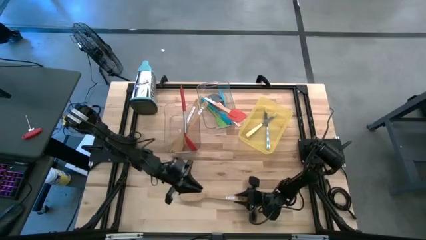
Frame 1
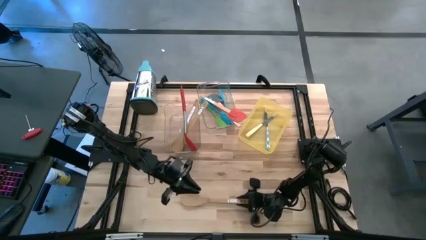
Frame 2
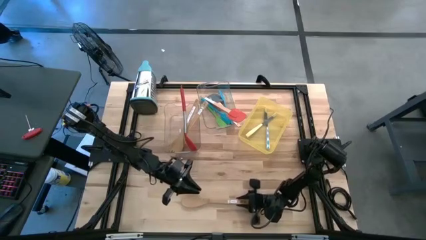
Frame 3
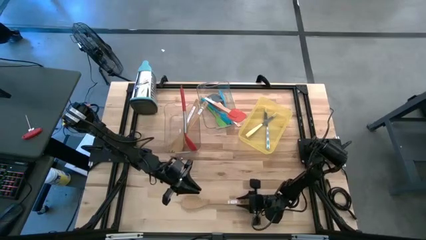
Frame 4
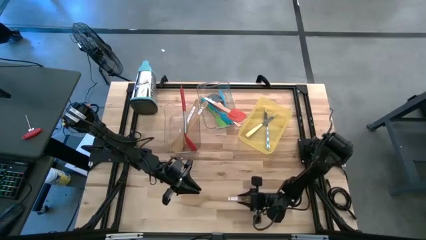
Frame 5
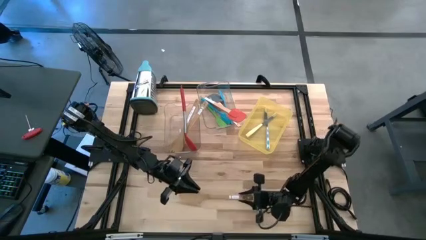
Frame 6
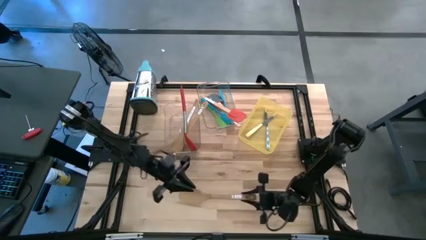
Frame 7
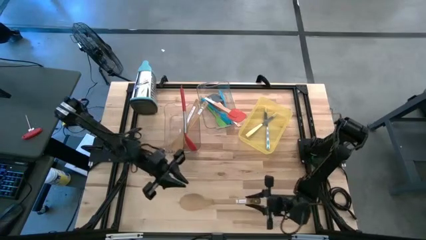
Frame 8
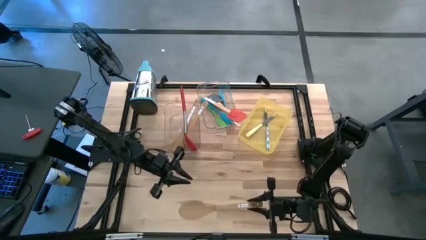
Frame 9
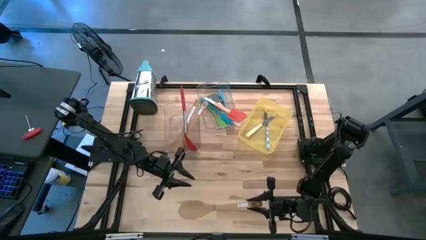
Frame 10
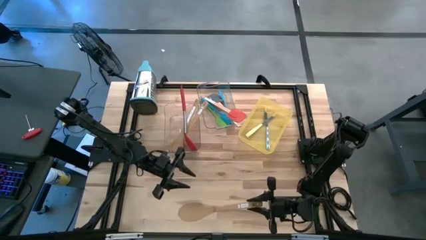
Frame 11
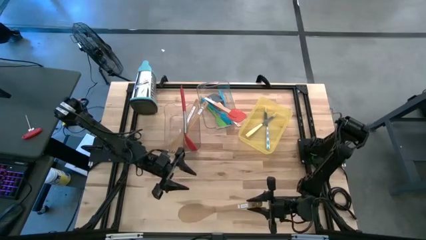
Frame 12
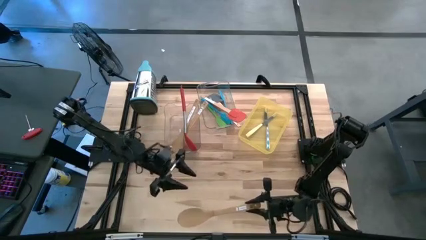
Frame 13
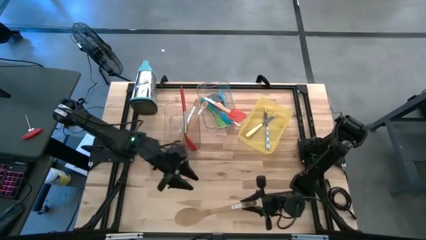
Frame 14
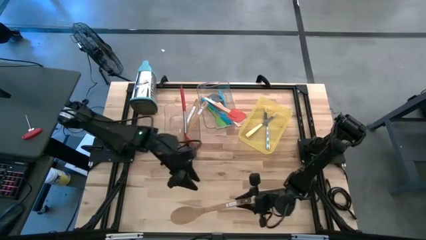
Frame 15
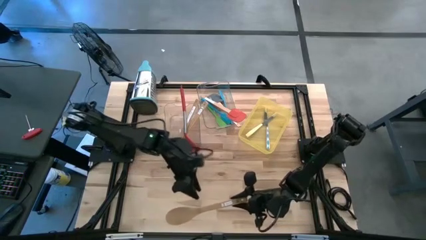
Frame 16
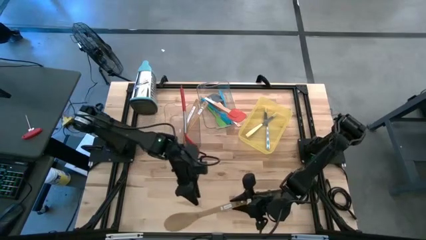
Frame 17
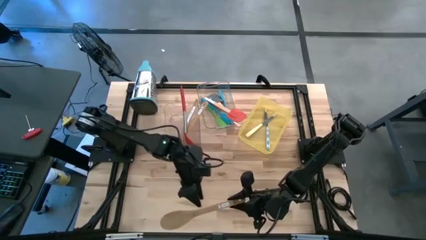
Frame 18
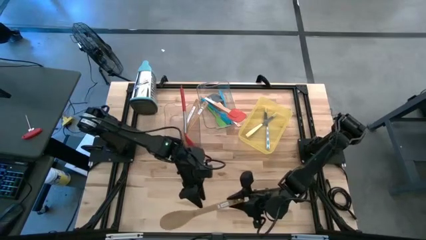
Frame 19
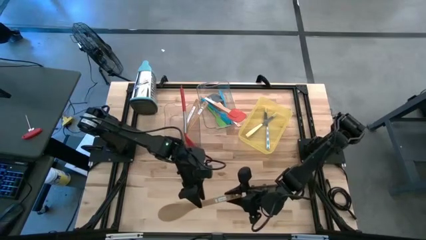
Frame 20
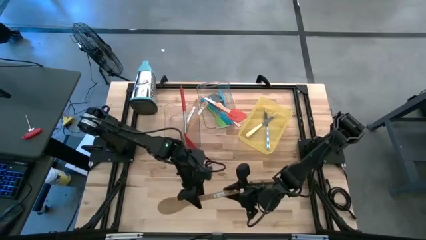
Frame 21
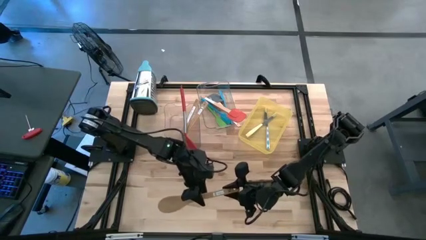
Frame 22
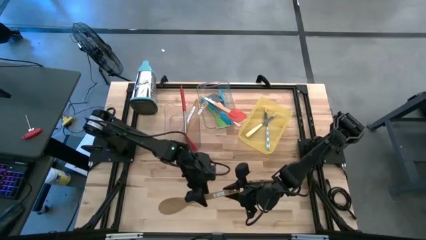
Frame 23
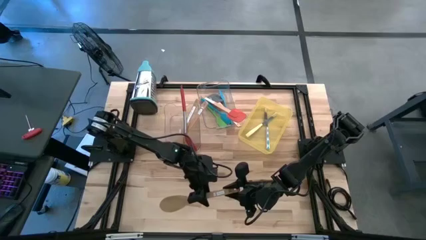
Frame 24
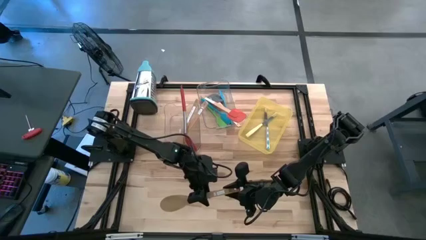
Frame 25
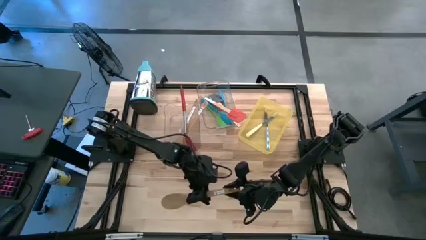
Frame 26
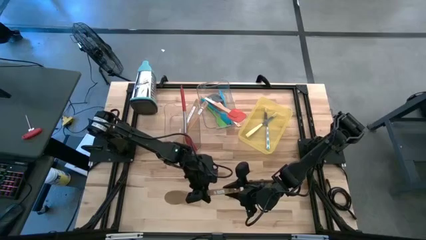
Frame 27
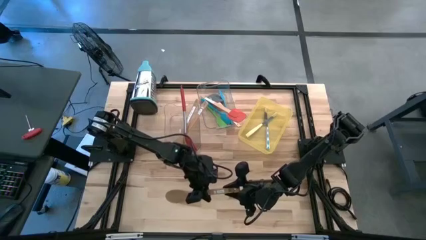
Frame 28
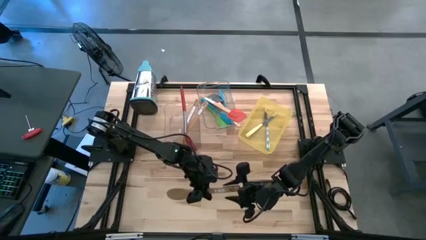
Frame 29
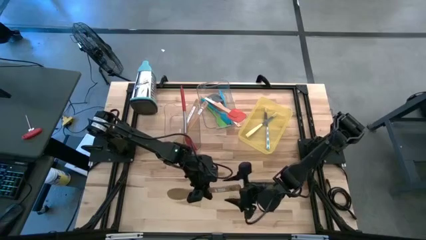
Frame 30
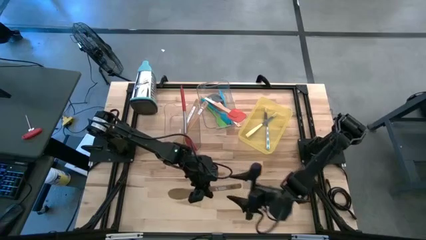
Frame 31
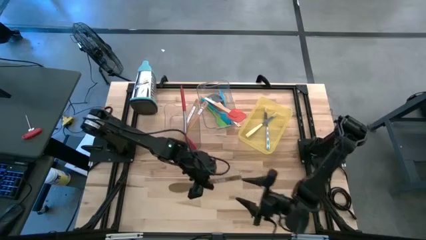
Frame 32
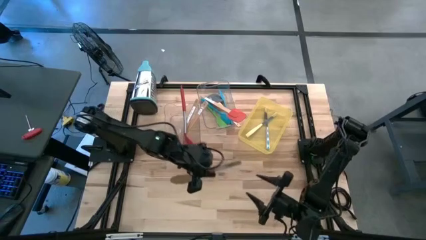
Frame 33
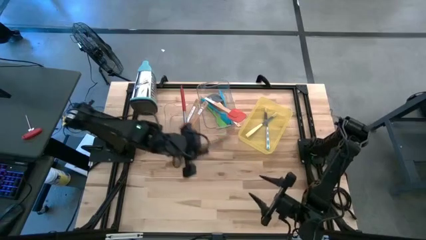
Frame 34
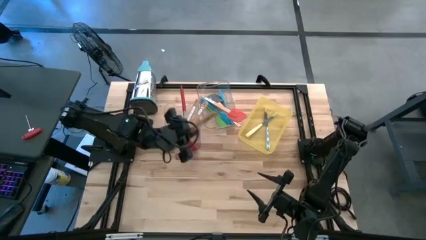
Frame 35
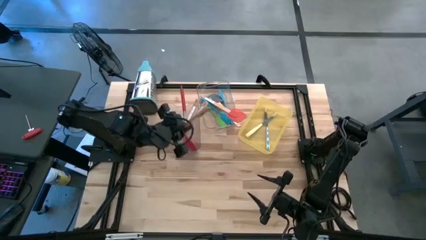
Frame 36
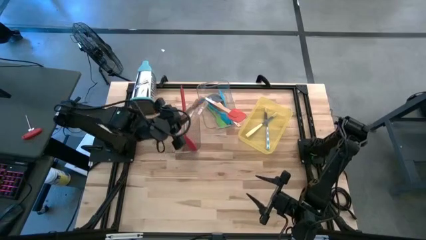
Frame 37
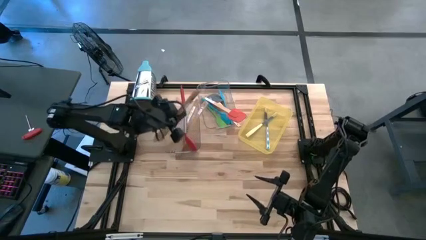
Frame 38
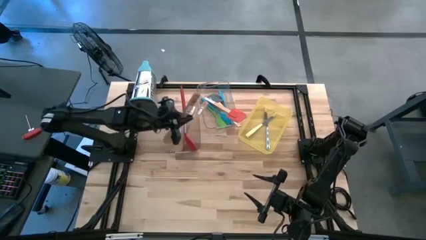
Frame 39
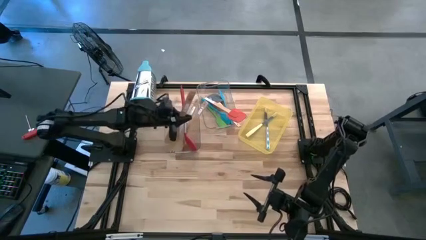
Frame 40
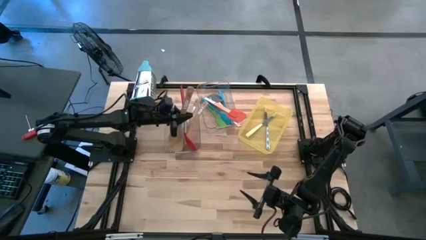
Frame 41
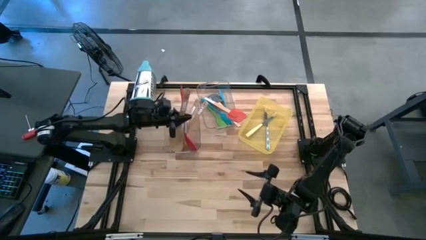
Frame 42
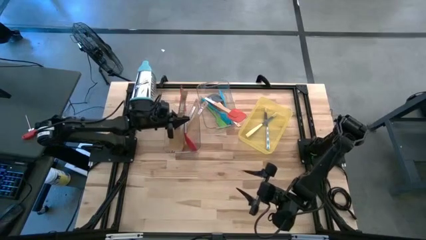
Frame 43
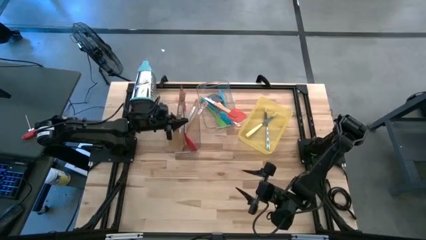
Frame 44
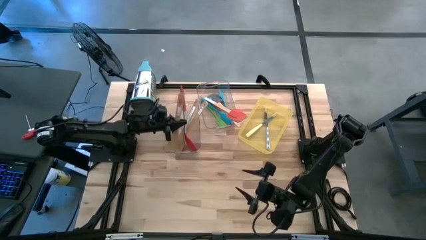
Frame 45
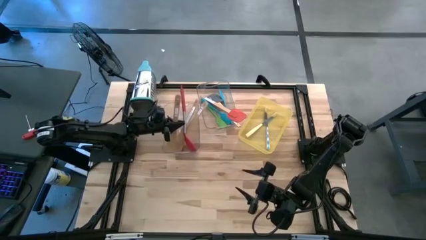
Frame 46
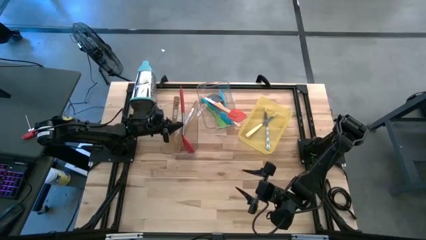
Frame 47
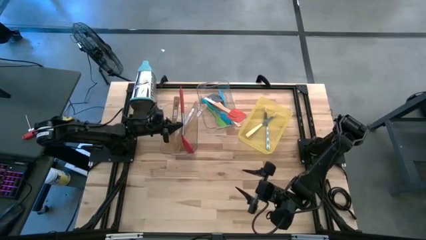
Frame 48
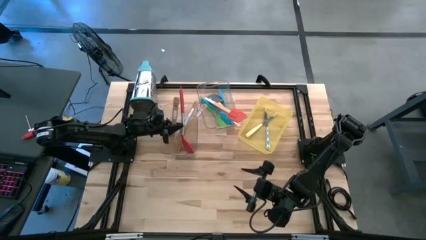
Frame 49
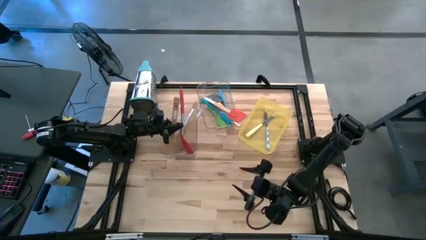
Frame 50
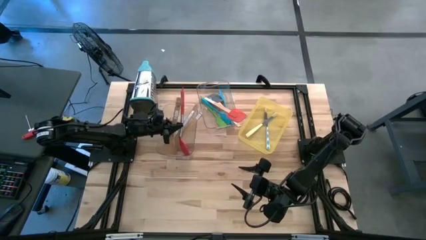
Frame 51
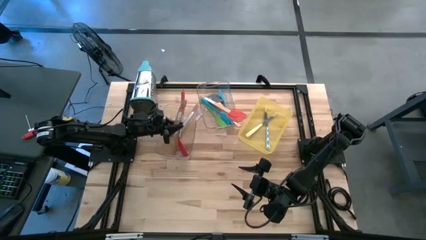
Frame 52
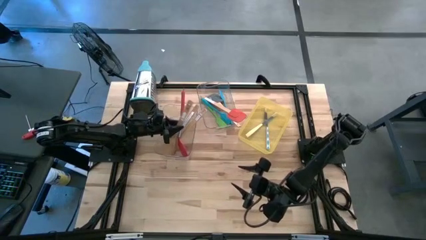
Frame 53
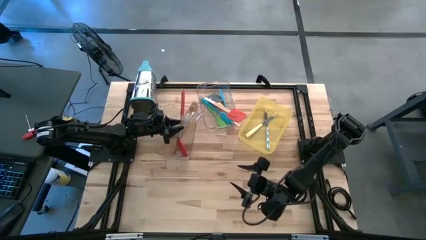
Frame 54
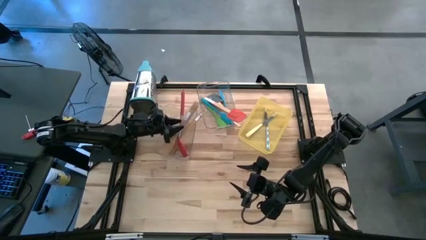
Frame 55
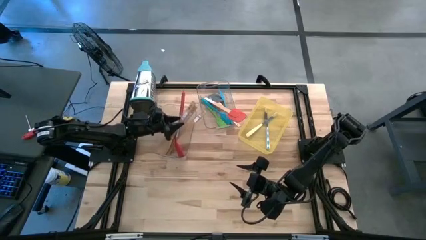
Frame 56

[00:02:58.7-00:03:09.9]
Task: Pick & Place Kitchen Items
Put the wooden spoon into the top left transparent bin

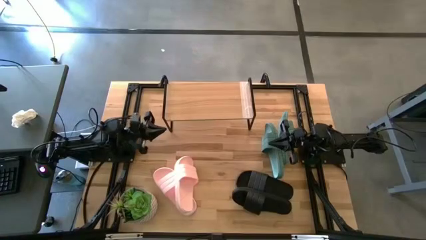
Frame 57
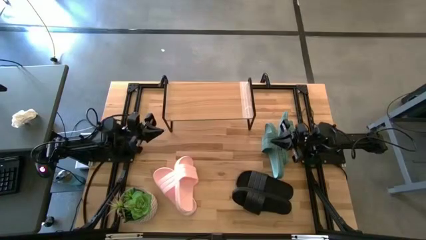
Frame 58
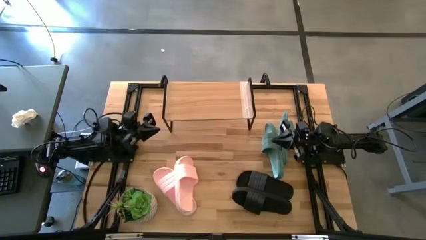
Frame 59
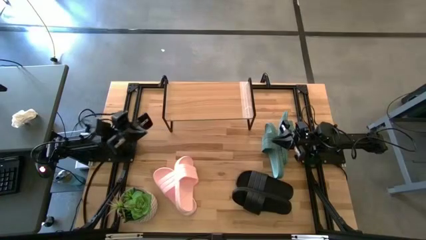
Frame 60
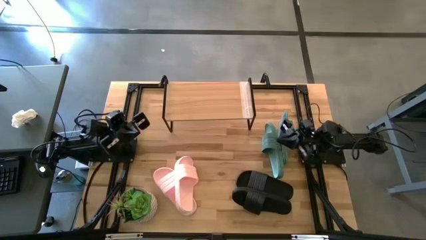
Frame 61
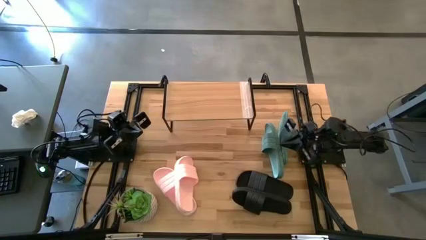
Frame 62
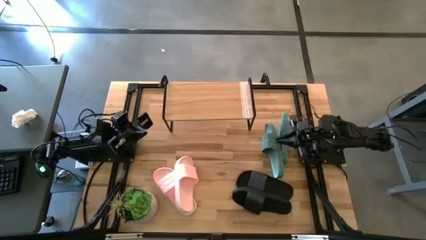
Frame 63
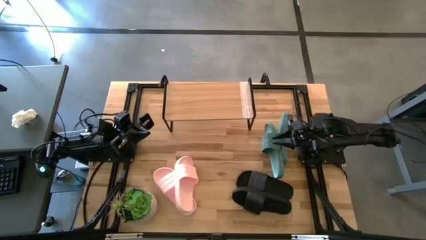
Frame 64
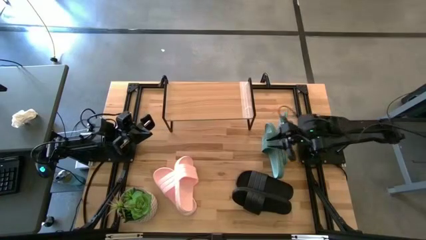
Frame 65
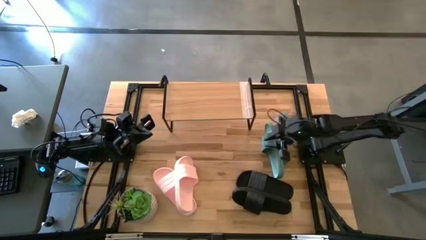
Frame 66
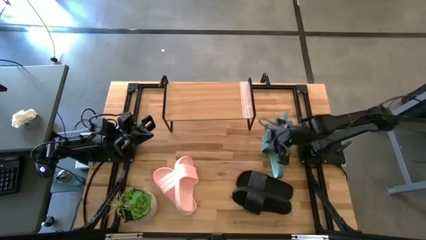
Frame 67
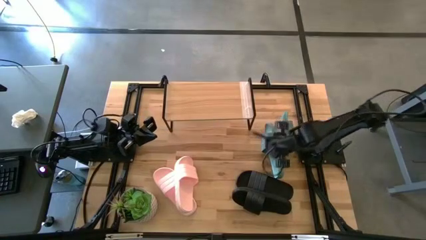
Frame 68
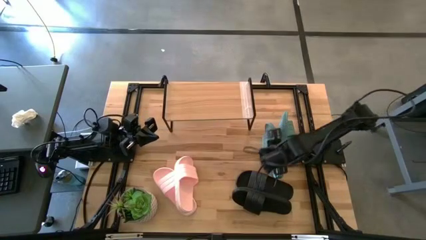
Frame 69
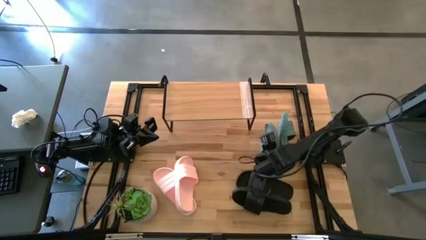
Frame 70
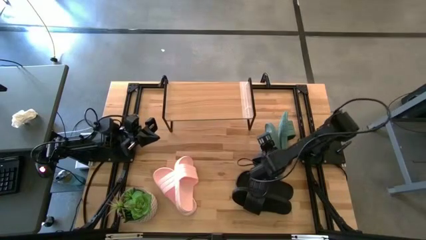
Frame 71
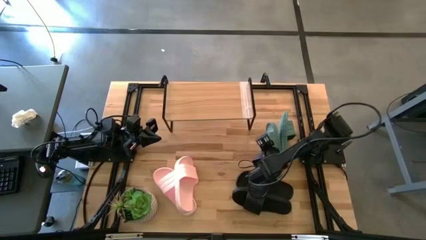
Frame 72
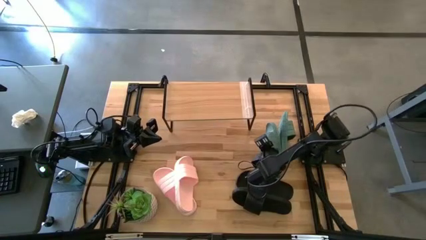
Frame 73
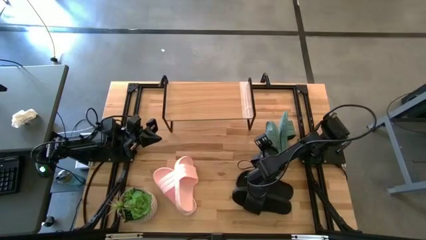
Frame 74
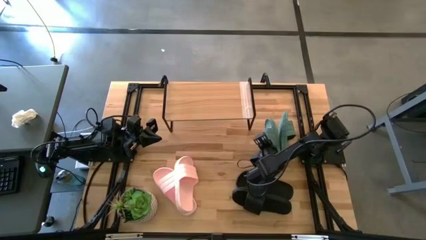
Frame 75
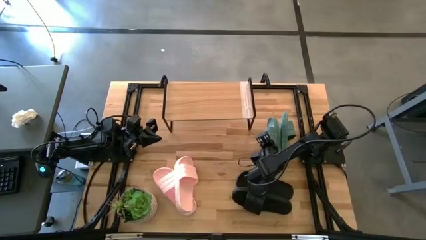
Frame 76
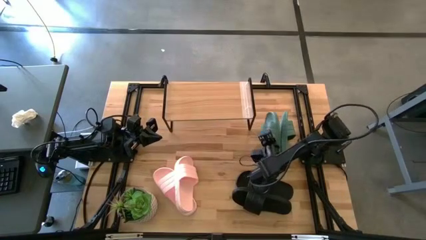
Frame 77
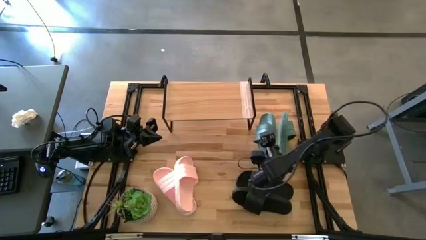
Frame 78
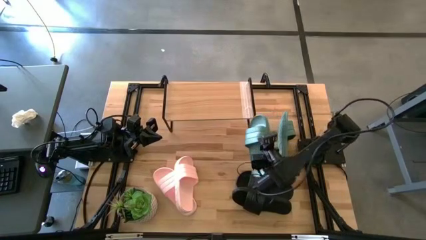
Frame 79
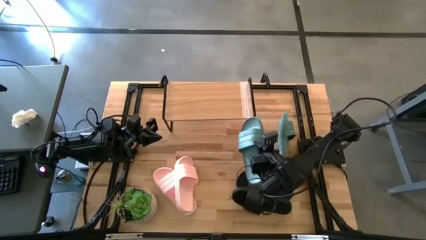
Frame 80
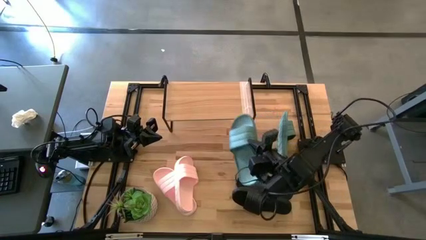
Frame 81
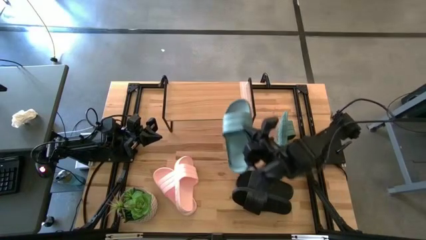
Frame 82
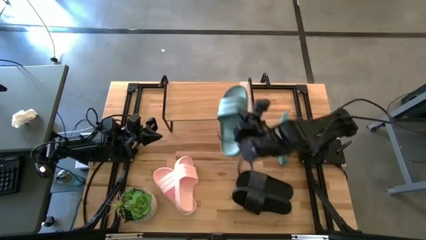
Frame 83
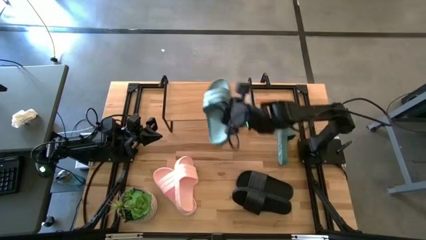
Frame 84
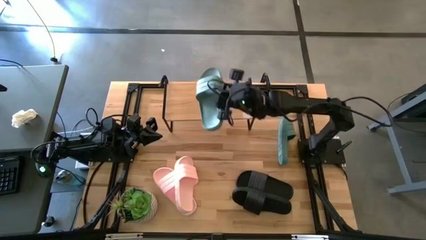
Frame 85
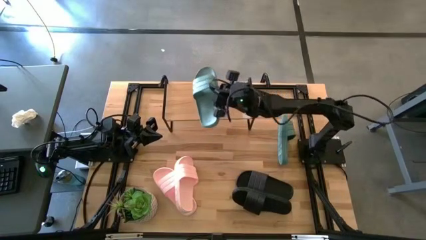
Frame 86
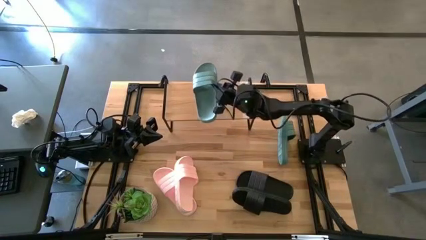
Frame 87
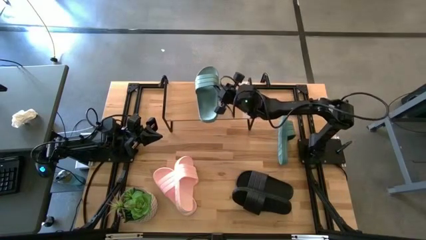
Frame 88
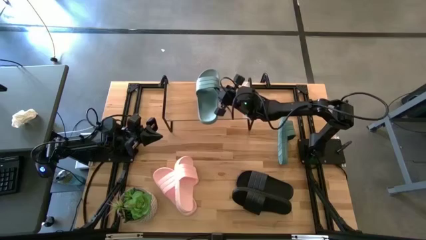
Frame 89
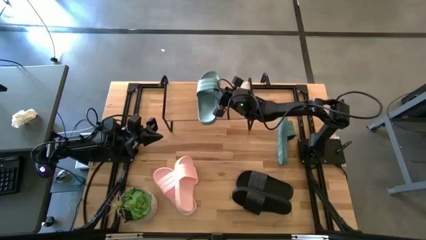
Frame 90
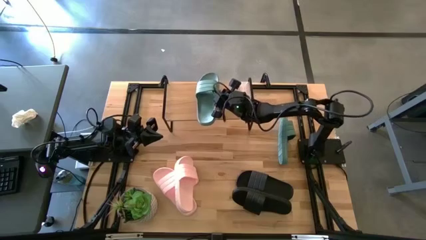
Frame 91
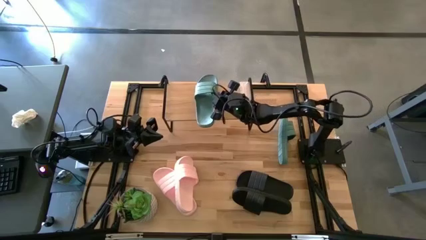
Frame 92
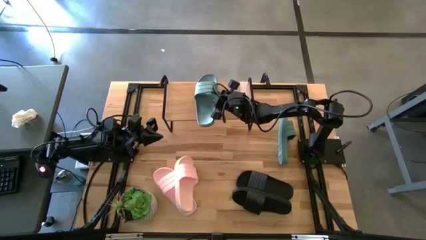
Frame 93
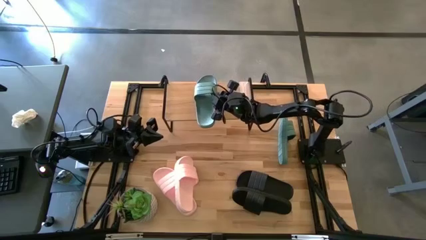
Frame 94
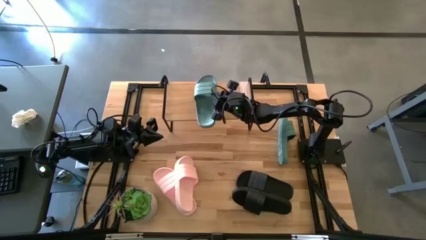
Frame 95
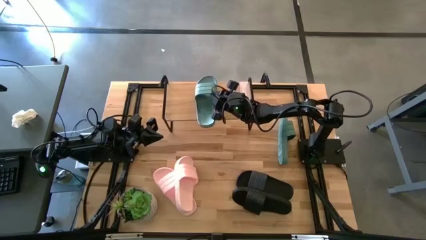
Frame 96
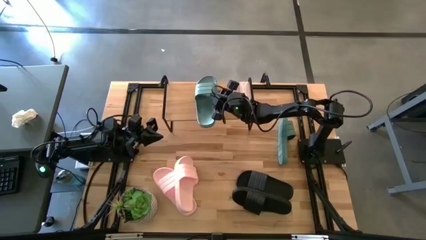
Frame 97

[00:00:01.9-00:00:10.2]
Task: Pick and place slides into the shelf
Put the left green slipper on the shelf
